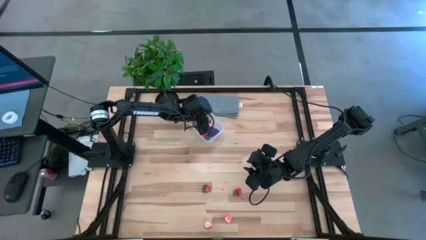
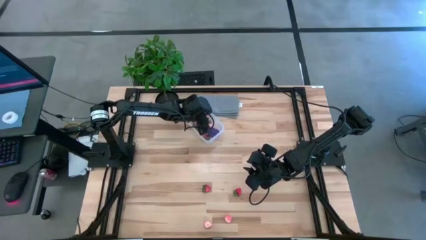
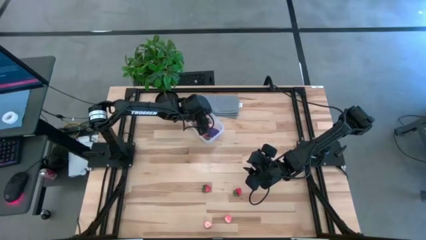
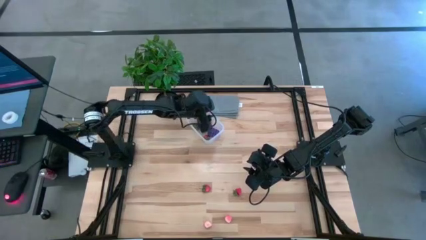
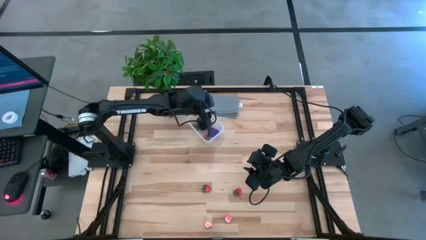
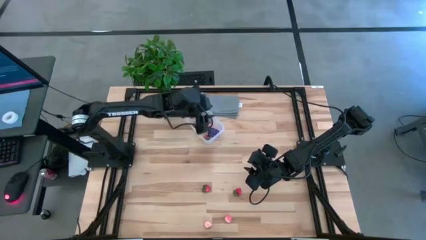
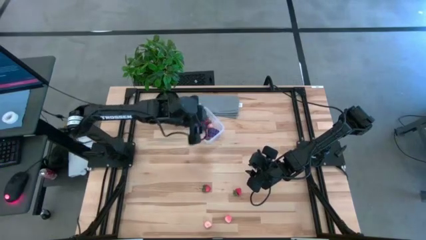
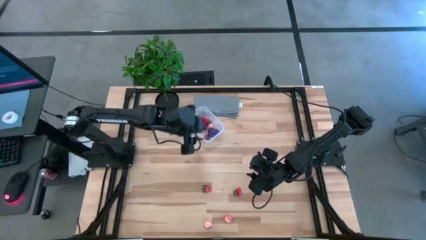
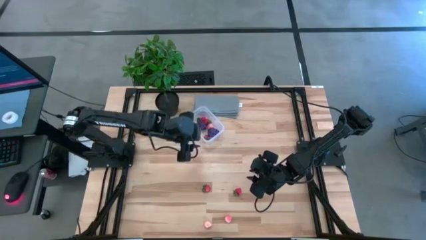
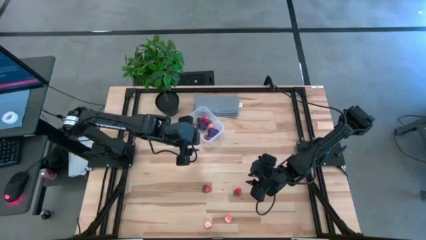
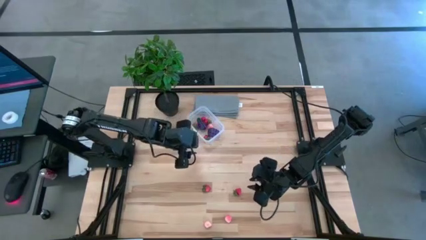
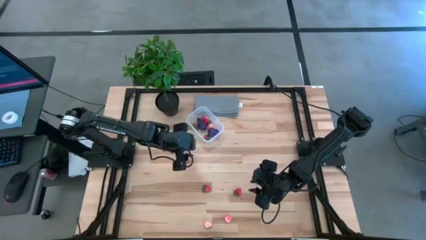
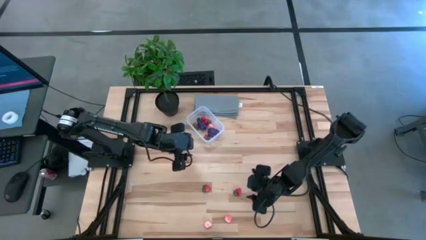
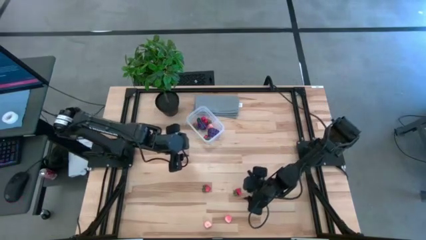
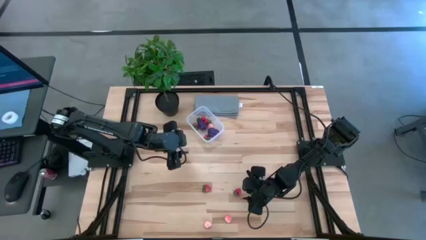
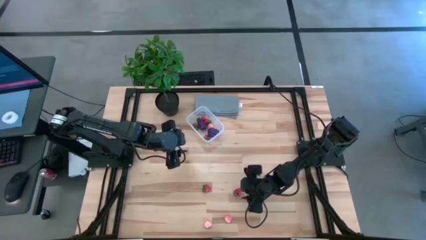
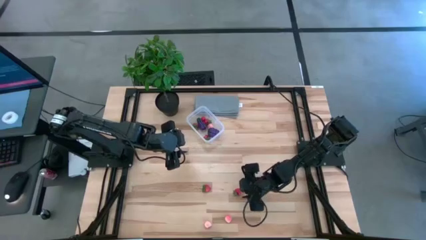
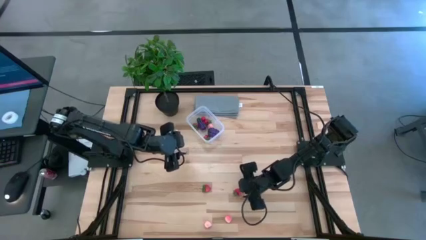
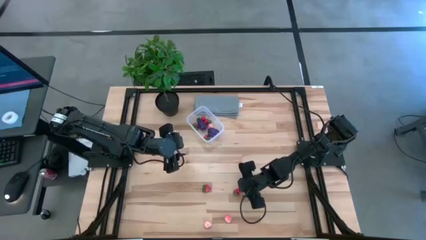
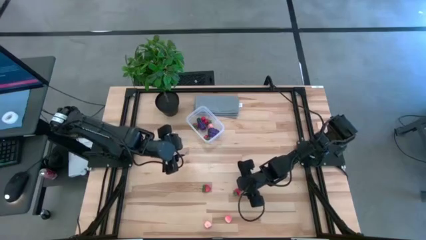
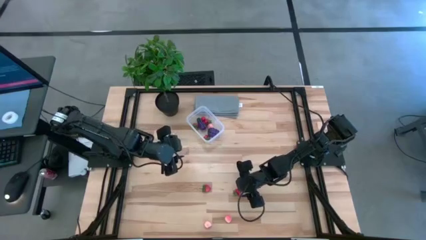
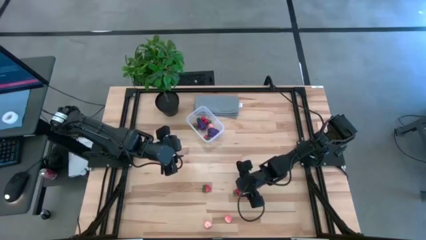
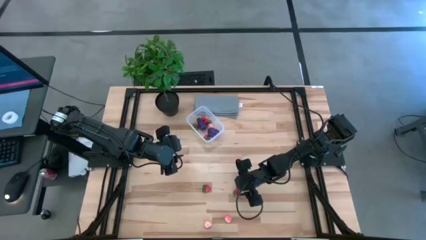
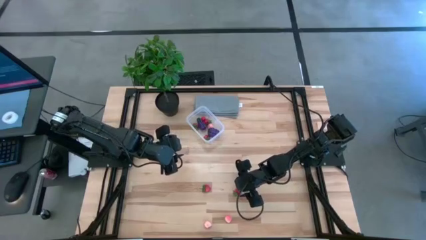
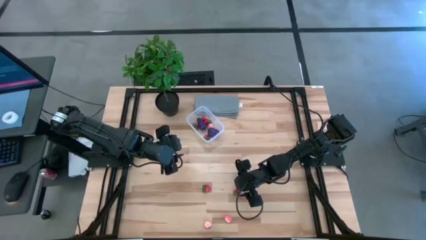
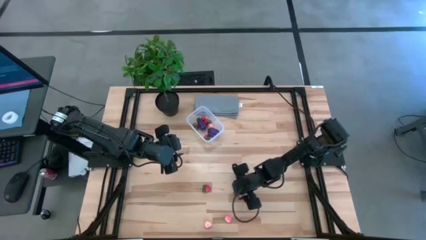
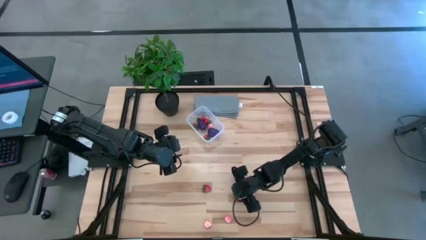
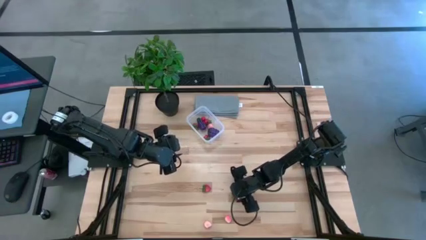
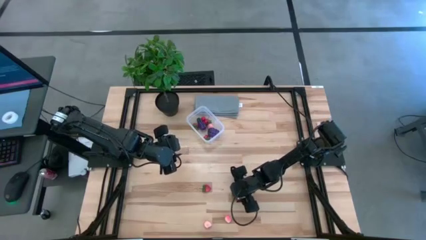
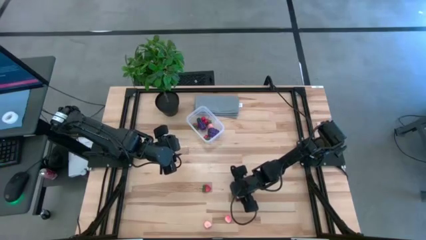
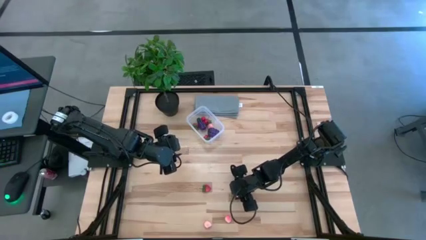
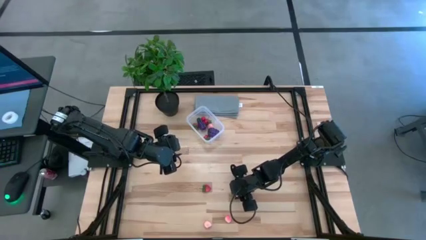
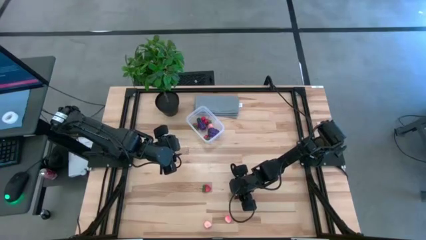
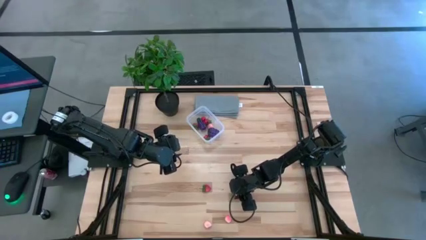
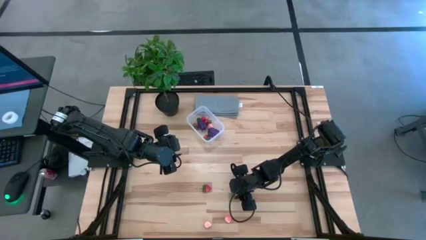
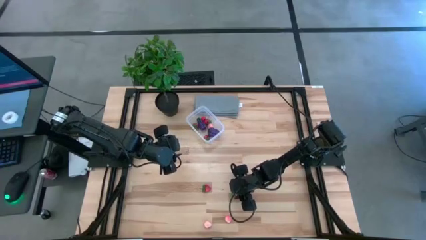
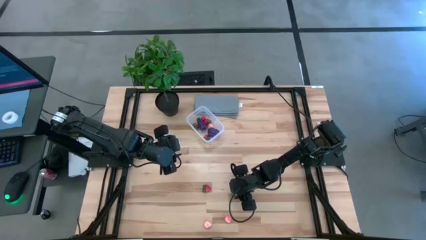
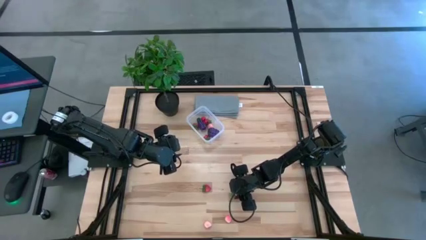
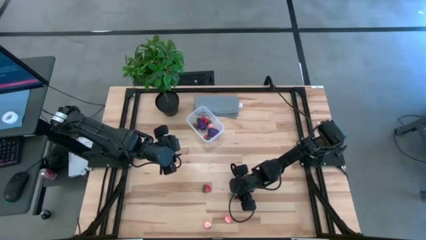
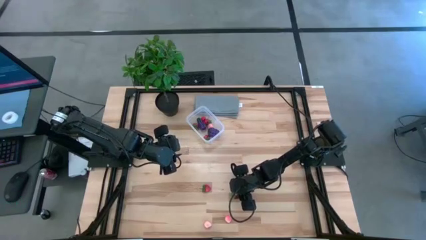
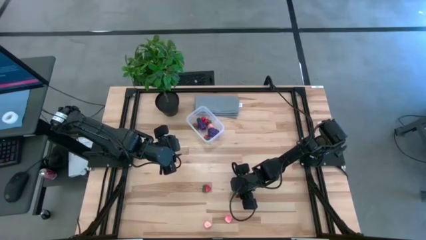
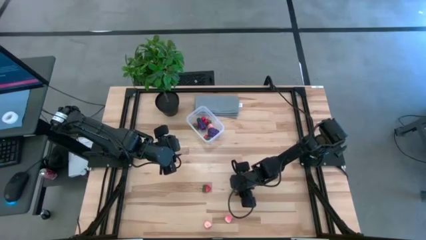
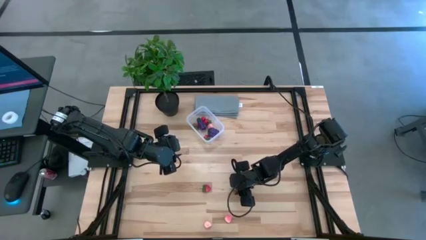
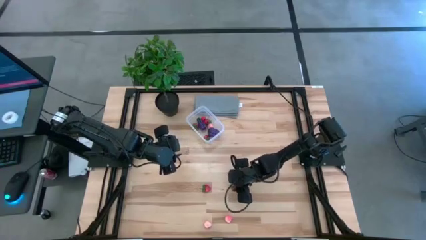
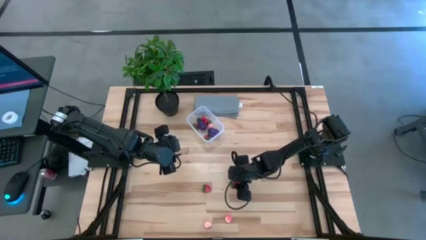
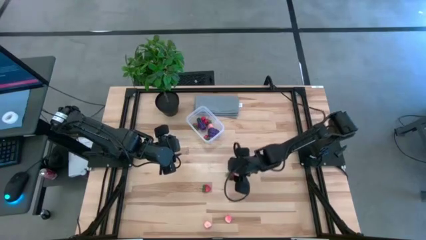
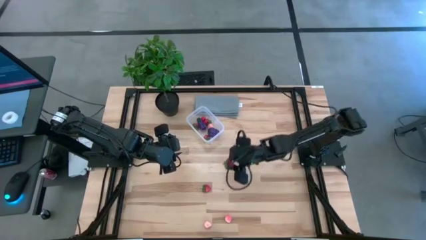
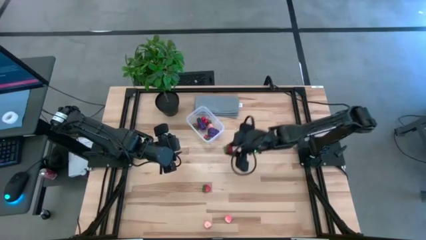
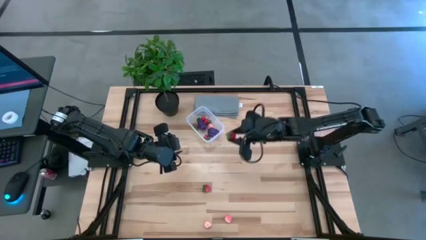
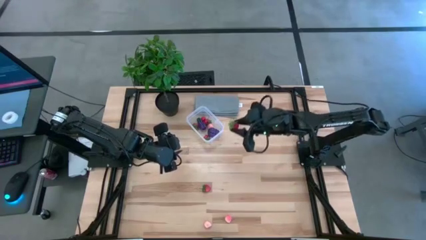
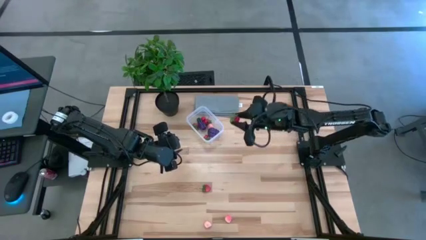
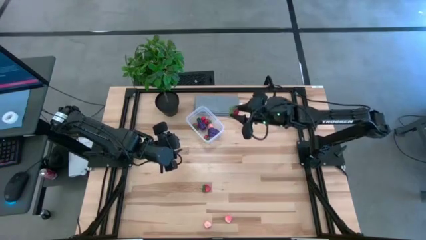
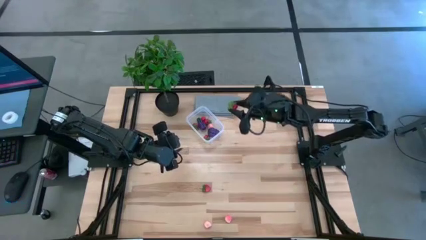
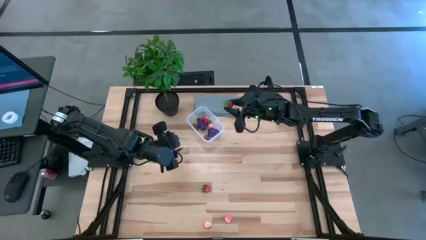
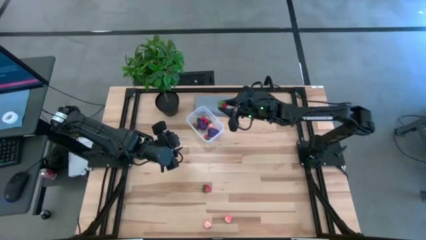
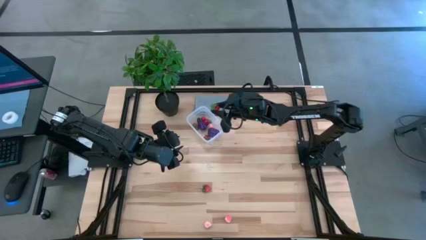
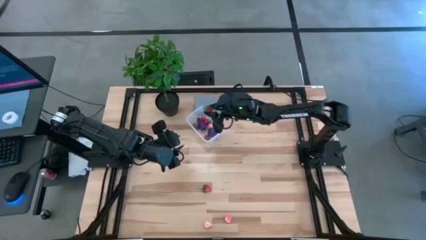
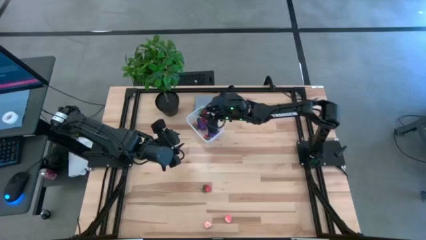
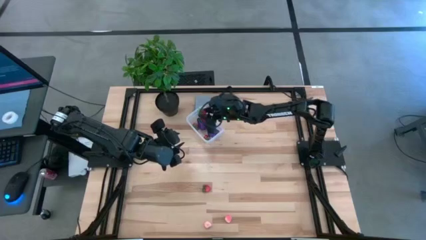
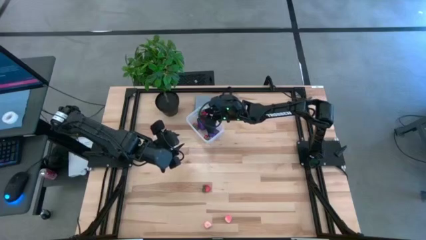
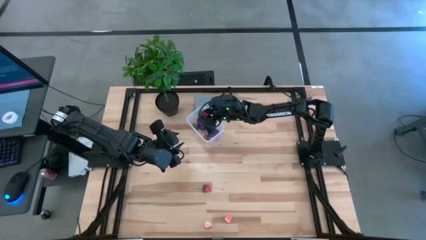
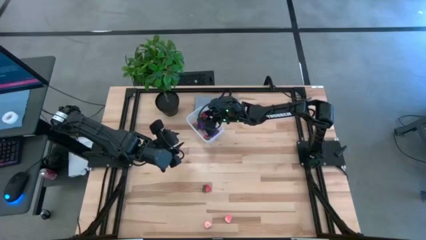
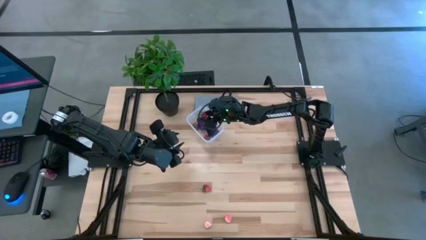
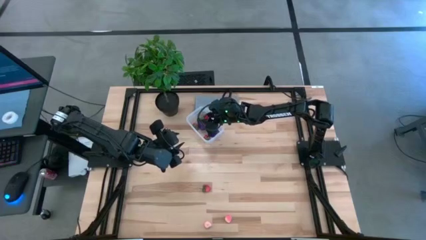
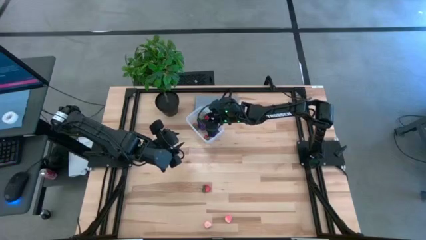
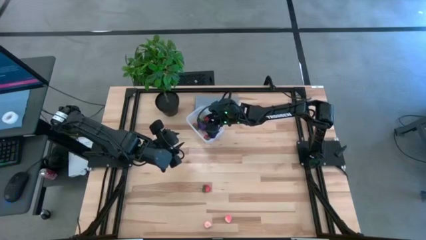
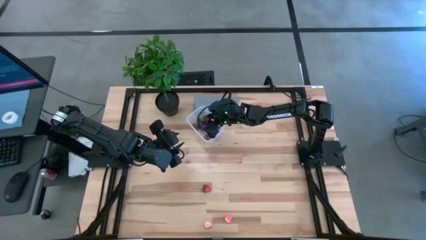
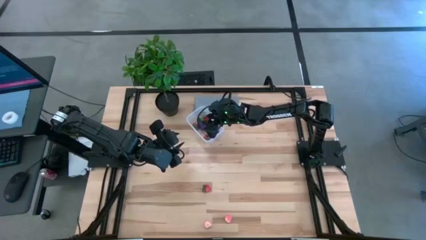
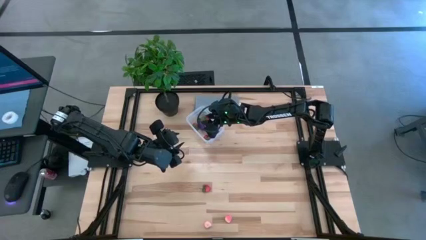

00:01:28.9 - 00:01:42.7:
Task: Pick and placing Produce into tupperware
Put the red strawberry into the transparent bin
